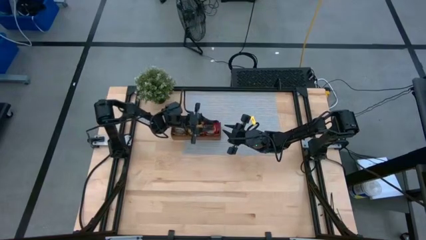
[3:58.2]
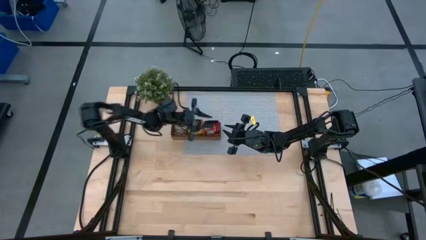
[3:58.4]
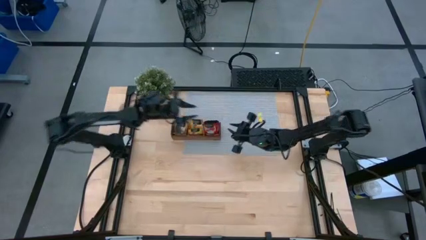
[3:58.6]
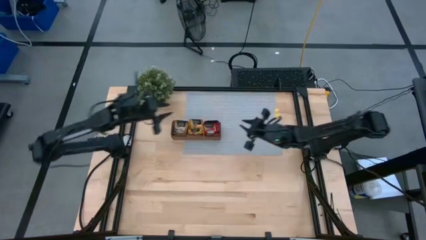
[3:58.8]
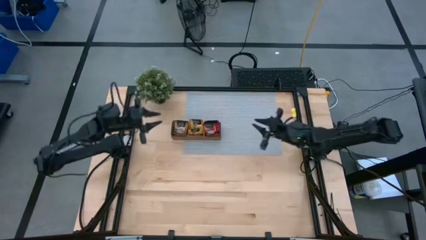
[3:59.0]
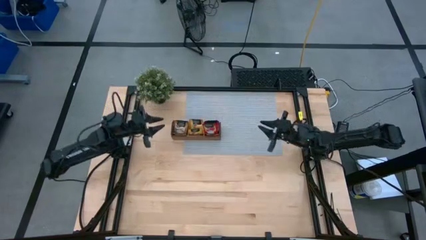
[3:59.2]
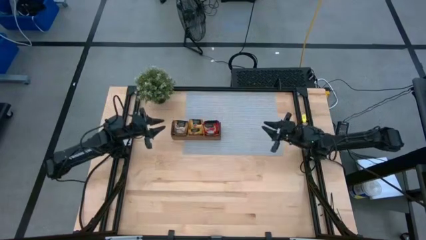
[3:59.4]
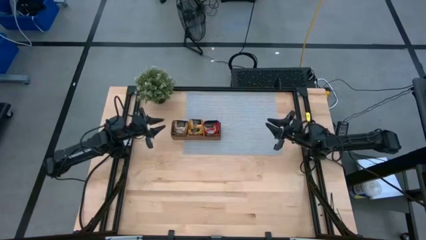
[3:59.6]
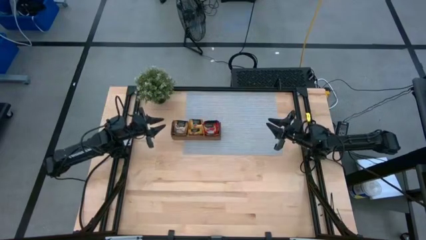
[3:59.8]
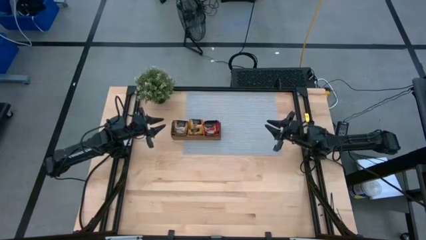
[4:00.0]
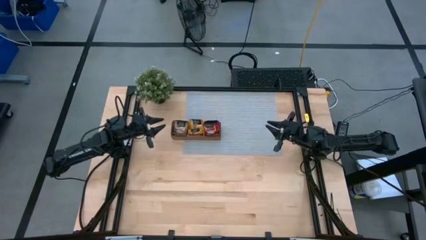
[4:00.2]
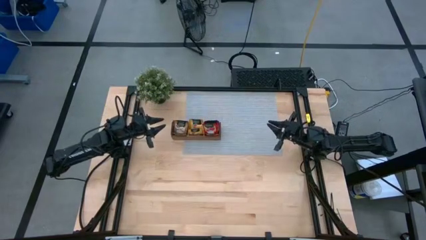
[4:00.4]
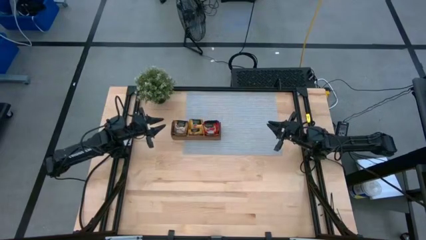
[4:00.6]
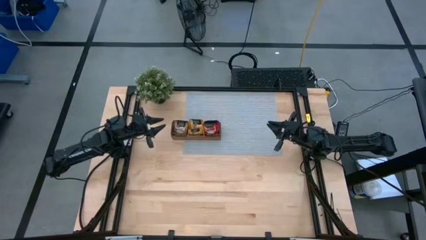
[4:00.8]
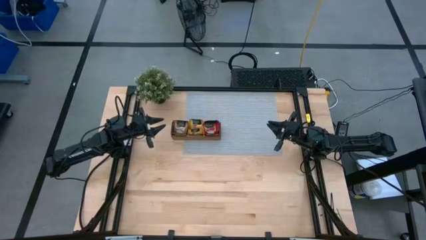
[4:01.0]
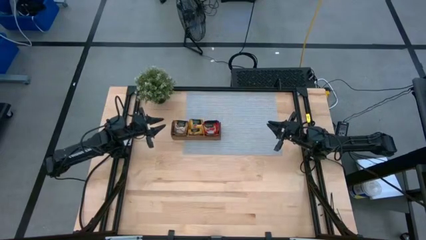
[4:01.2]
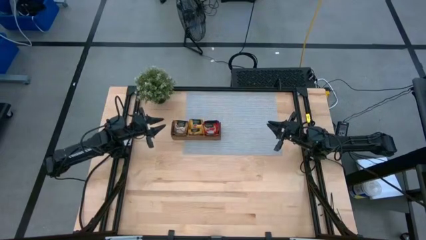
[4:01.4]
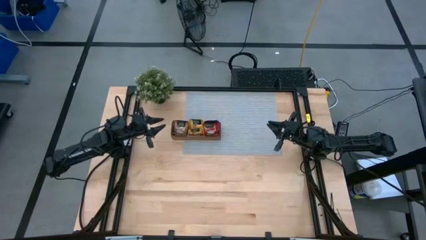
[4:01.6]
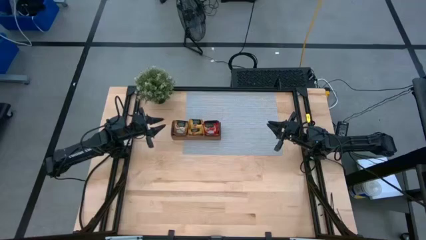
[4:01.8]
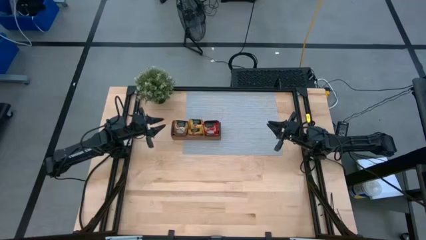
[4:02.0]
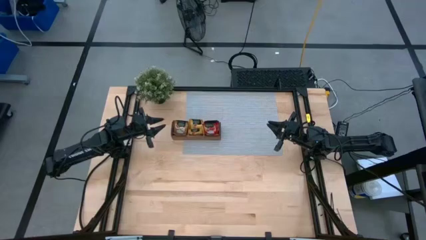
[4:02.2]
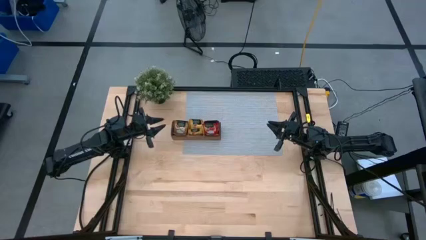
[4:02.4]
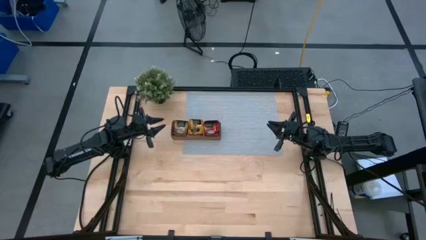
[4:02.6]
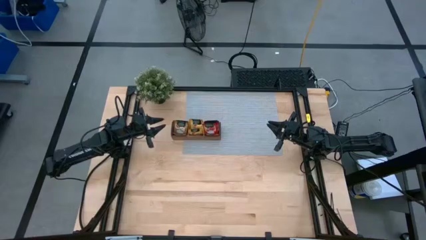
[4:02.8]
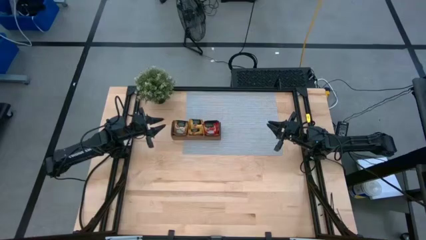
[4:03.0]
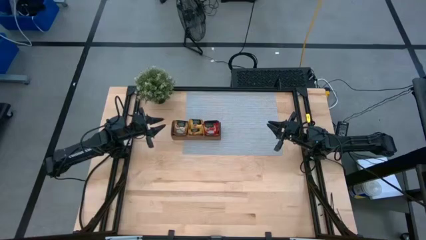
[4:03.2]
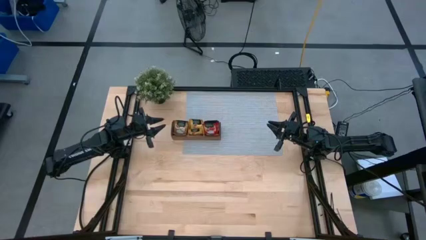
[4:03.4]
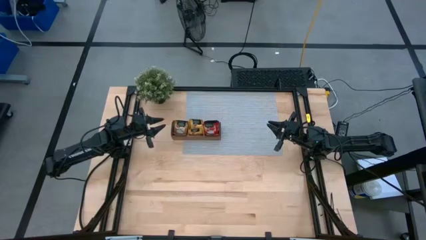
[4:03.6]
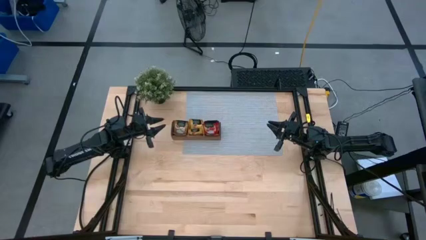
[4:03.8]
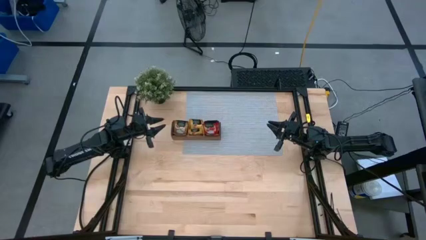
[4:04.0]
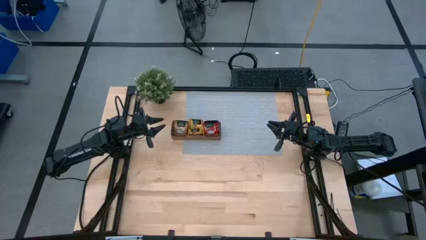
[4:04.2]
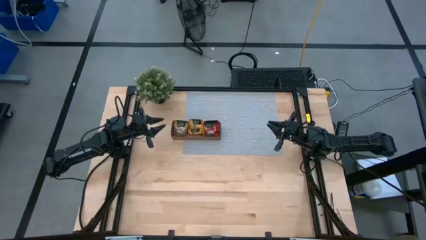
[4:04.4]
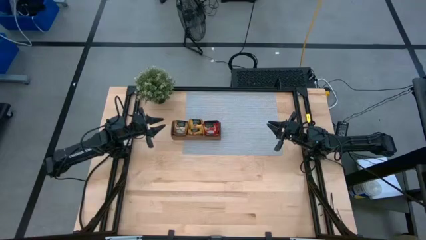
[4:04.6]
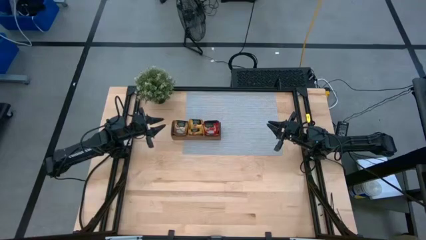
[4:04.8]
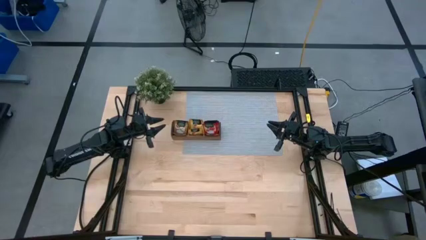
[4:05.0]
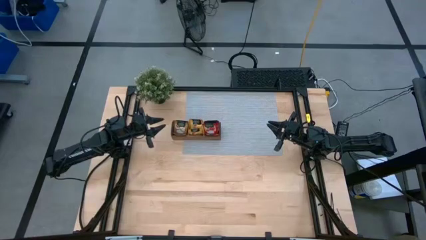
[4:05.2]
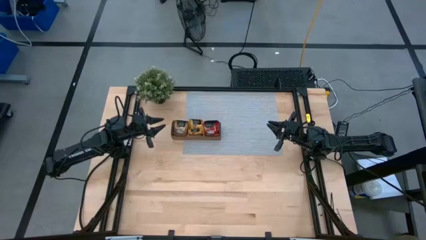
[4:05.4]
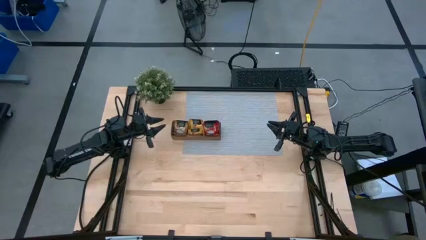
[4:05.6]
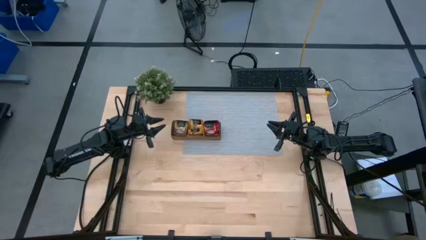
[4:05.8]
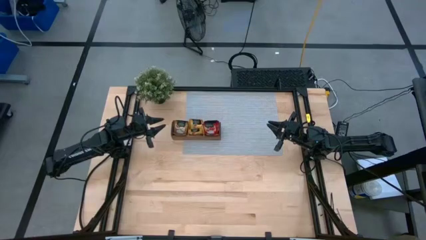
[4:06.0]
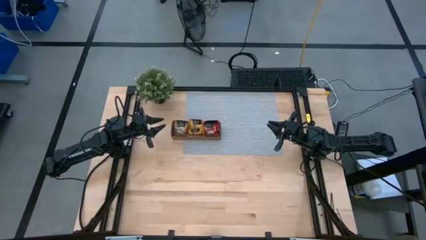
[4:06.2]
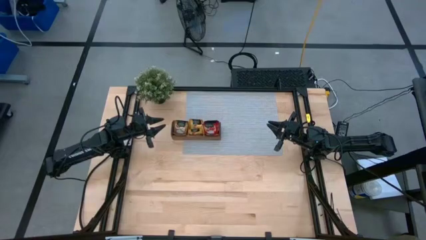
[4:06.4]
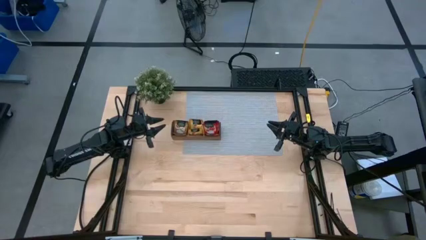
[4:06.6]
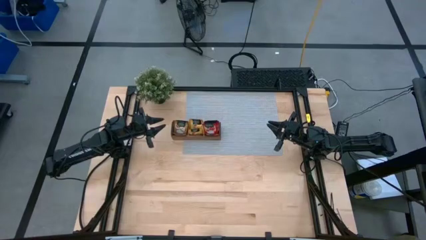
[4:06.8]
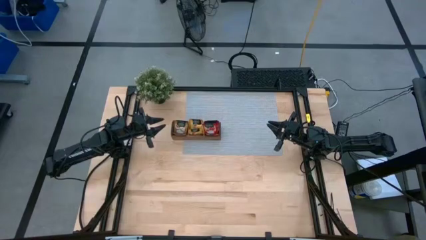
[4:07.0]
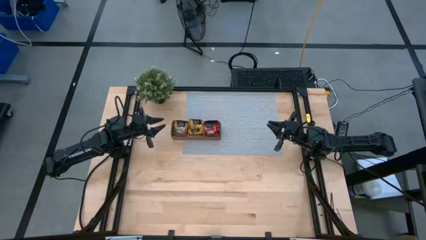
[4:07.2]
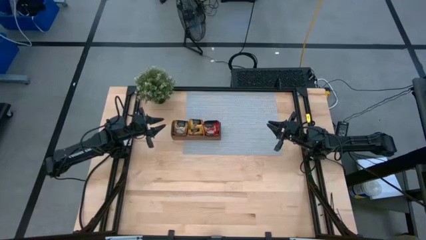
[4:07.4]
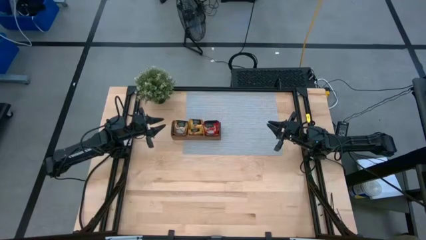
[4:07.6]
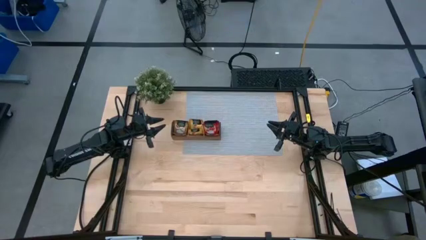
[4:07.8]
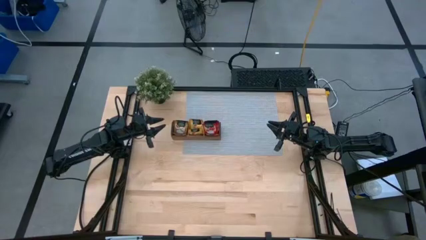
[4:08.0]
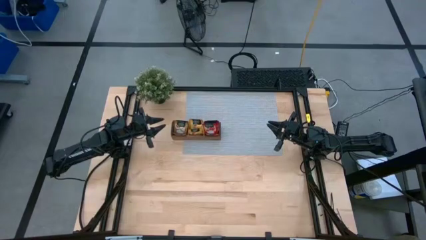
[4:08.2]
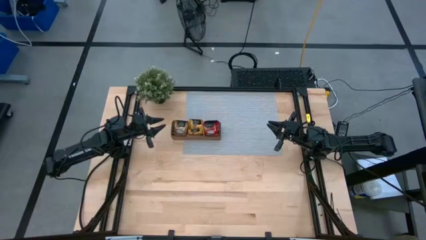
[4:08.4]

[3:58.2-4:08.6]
Task: Pick & Place Tea
Return to Home Position

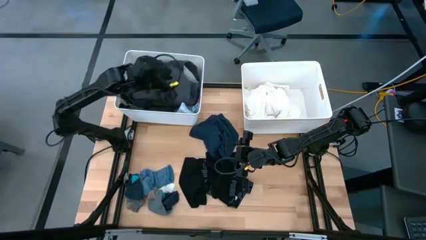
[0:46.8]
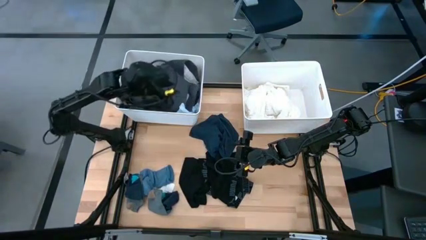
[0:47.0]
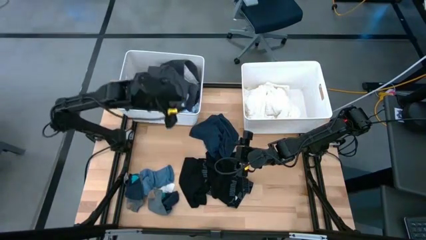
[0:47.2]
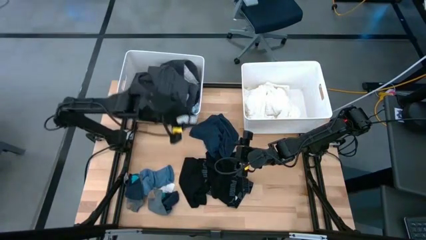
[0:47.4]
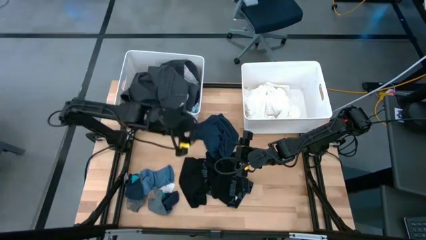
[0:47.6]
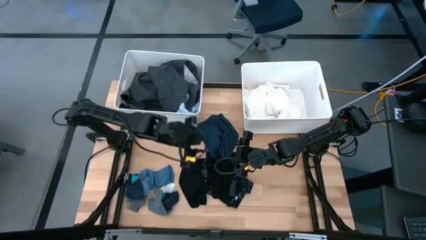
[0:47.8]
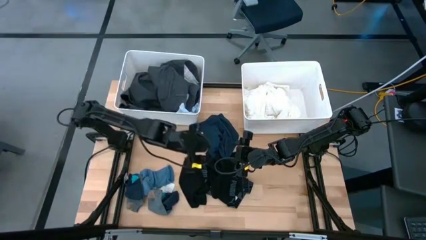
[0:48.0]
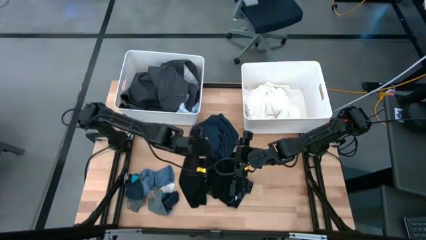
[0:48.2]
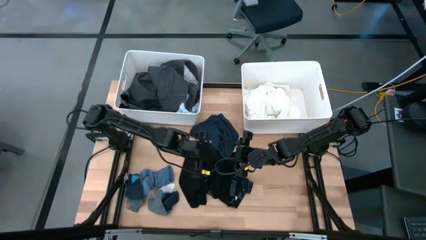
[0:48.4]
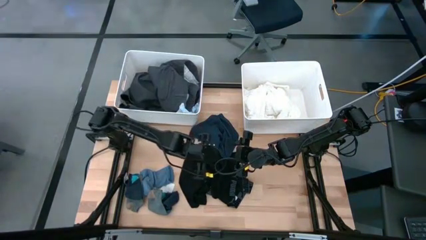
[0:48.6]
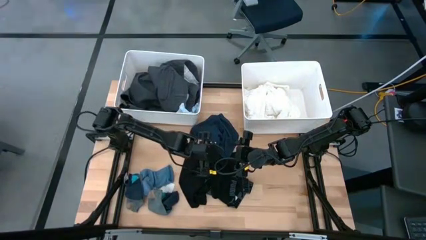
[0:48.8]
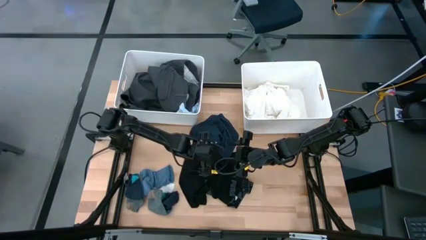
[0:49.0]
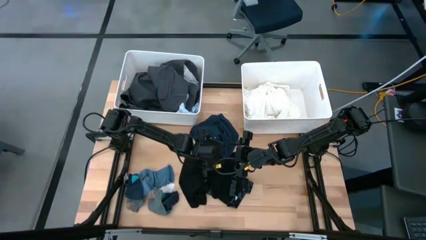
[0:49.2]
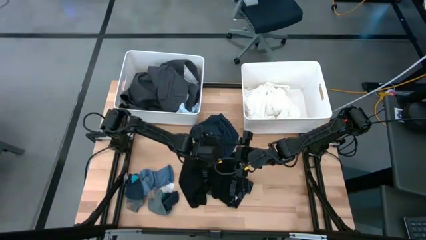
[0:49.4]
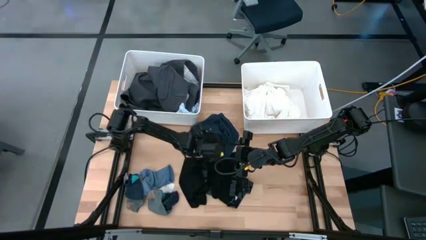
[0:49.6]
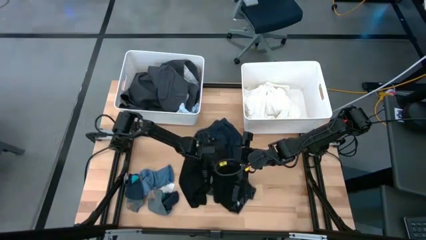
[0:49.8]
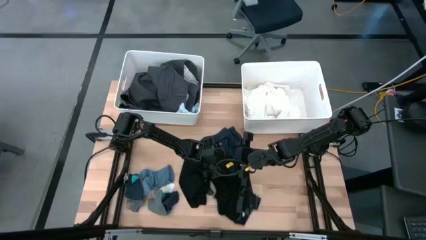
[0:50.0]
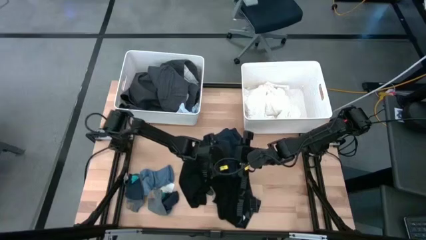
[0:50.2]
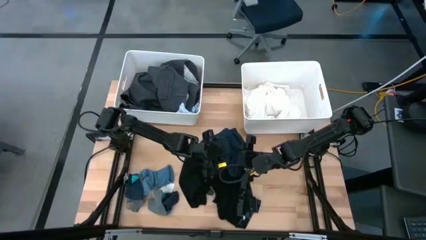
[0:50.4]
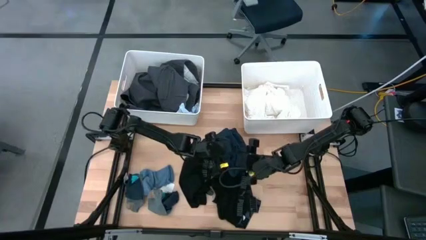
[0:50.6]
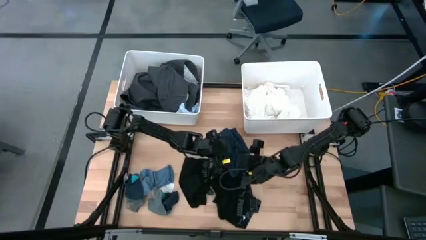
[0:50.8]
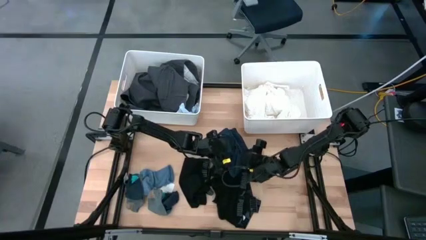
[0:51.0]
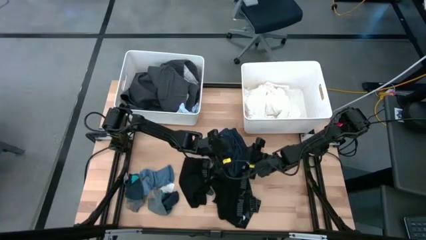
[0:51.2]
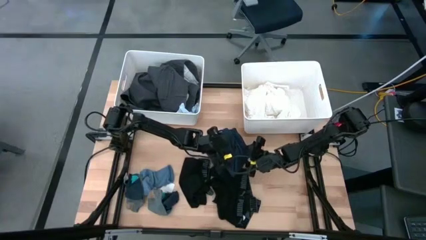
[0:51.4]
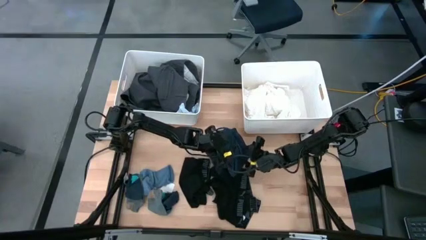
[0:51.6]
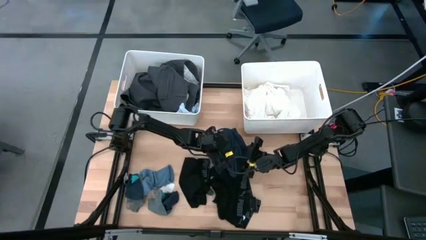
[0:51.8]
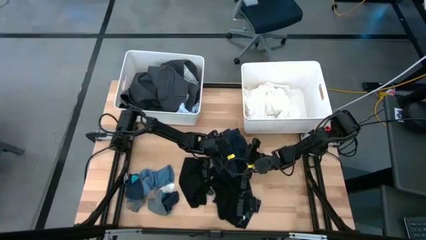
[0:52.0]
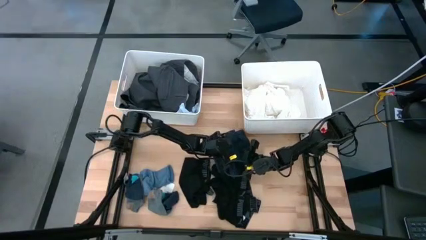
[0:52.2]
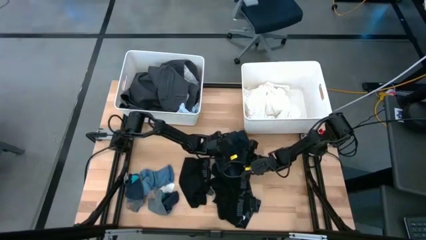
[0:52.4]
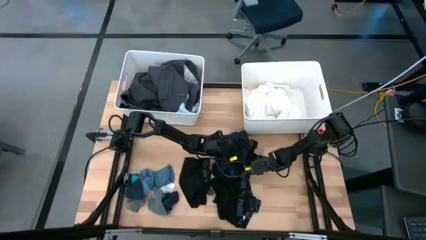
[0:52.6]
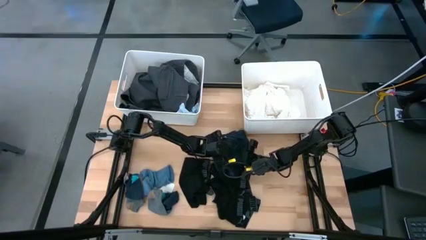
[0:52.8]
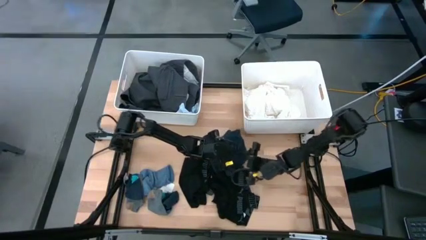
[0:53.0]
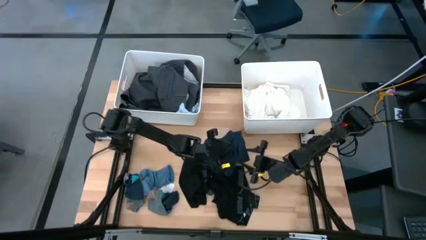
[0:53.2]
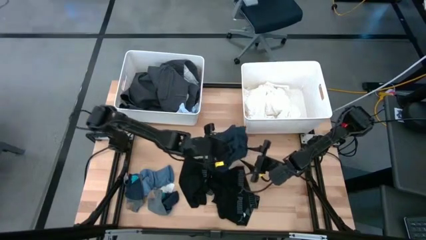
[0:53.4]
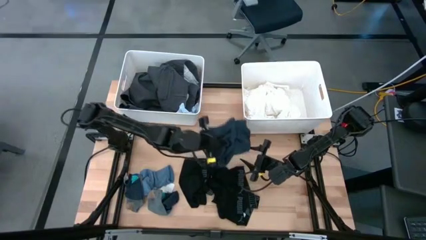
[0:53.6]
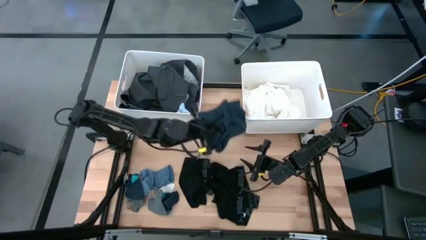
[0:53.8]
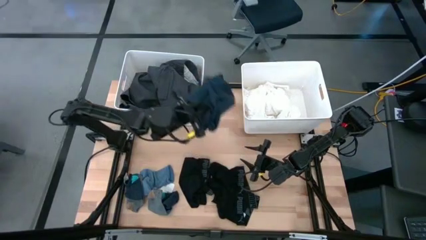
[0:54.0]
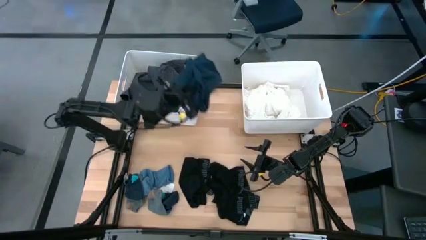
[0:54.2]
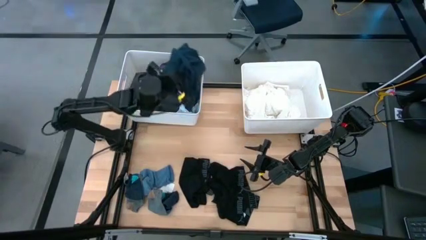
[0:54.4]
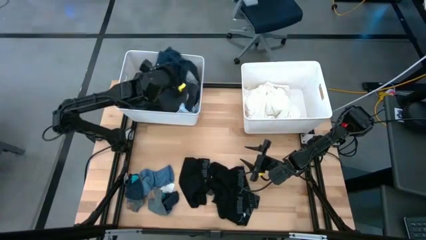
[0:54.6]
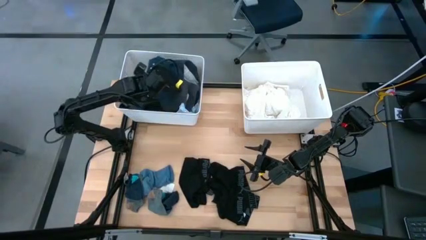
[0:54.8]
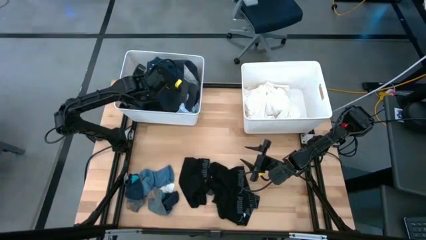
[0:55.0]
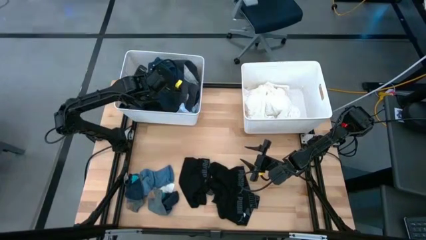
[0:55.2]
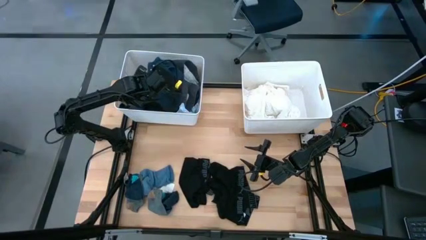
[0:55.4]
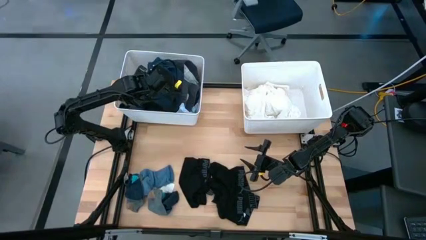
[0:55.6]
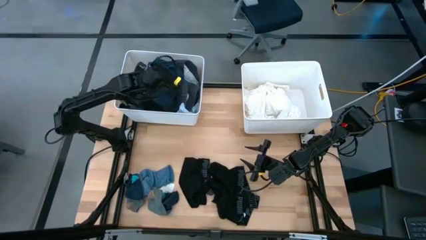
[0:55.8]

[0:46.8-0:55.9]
Task: Sort clothes
Put the black short into the left white laundry bin
